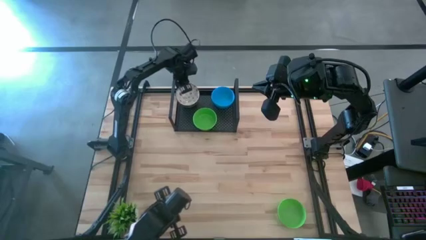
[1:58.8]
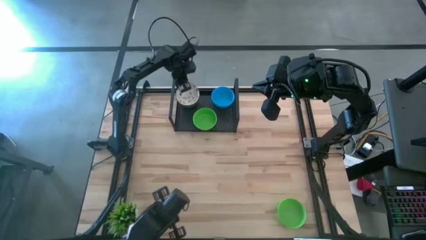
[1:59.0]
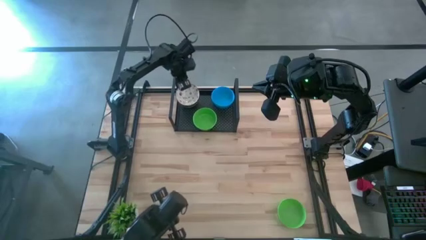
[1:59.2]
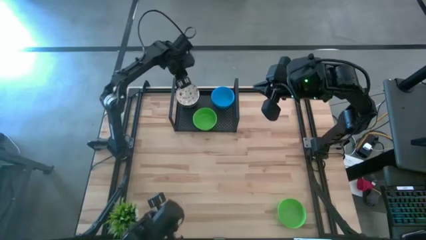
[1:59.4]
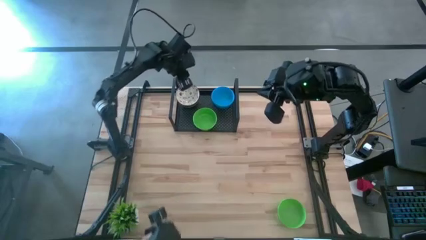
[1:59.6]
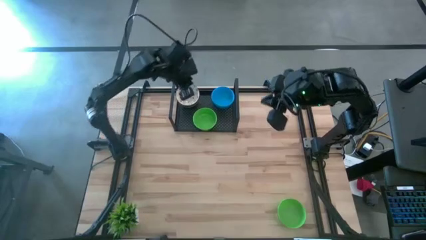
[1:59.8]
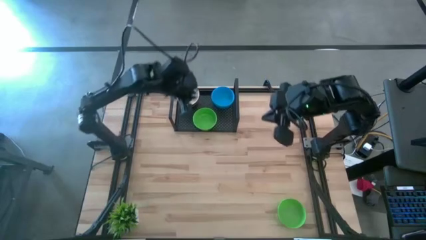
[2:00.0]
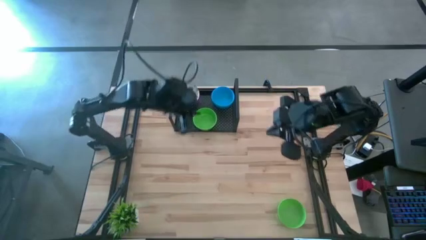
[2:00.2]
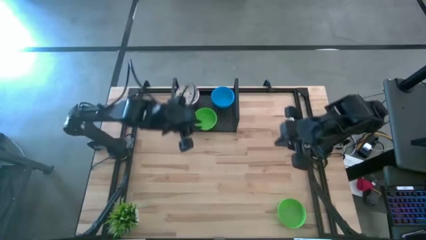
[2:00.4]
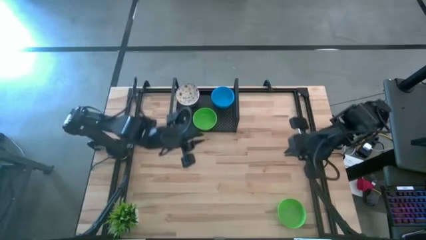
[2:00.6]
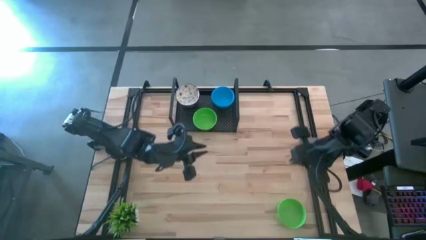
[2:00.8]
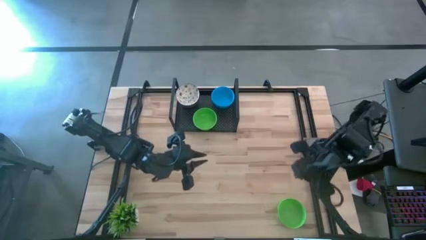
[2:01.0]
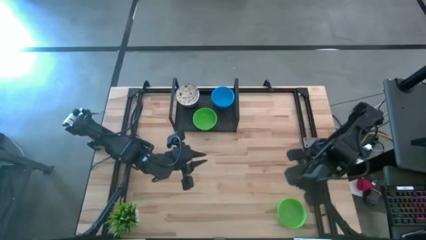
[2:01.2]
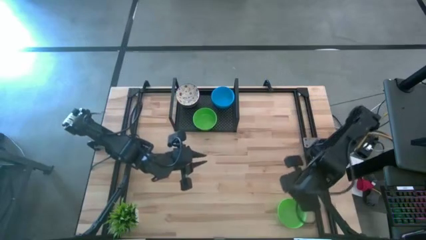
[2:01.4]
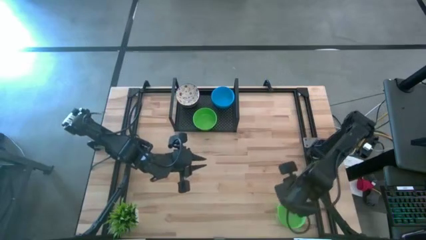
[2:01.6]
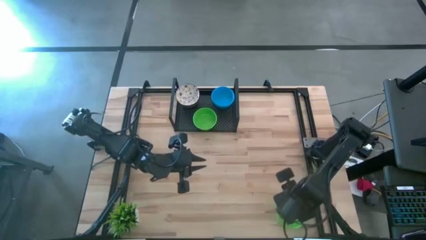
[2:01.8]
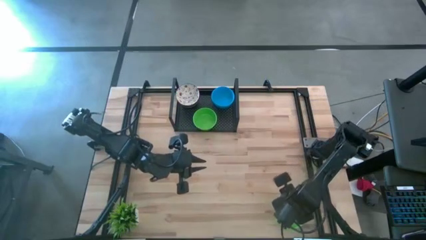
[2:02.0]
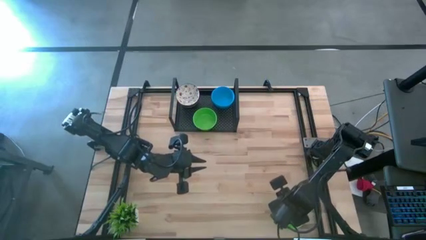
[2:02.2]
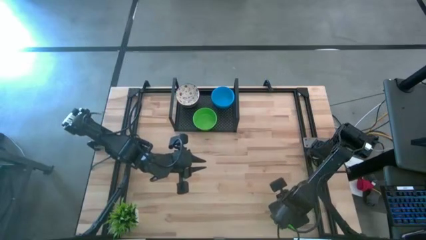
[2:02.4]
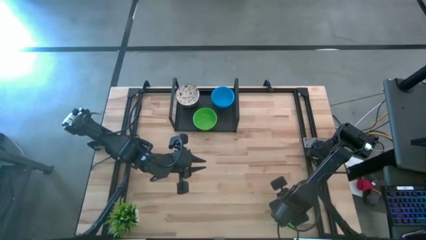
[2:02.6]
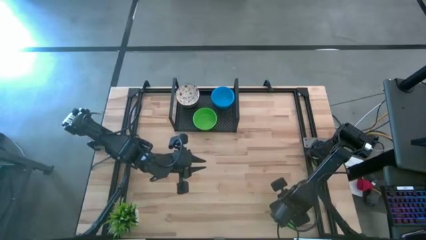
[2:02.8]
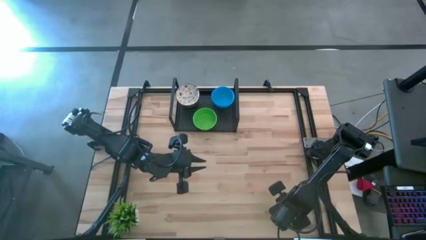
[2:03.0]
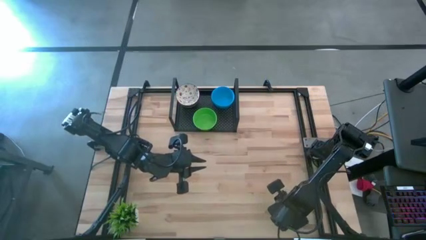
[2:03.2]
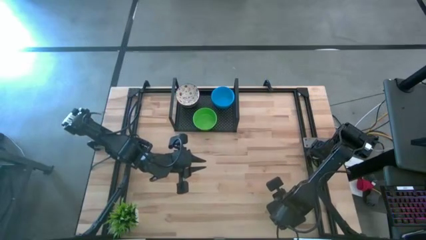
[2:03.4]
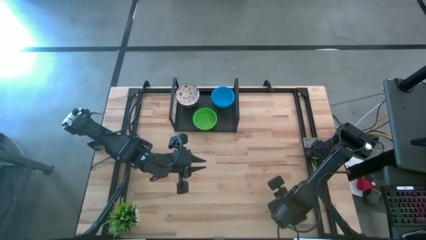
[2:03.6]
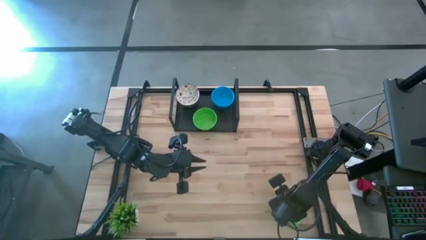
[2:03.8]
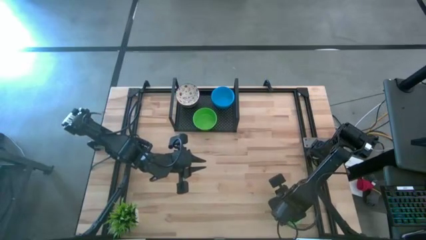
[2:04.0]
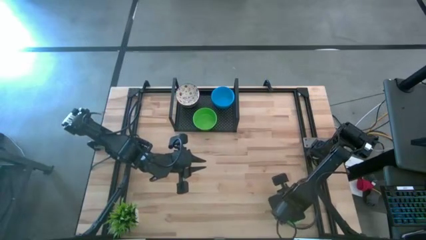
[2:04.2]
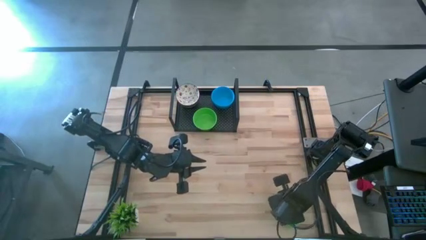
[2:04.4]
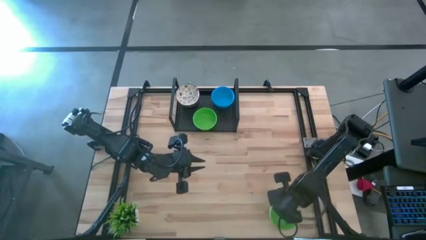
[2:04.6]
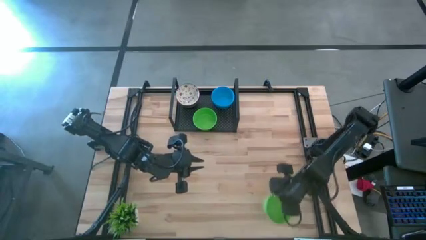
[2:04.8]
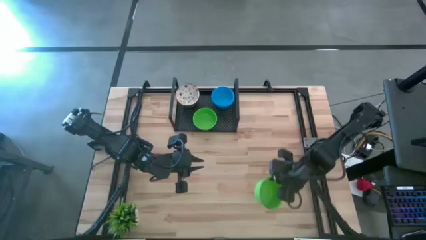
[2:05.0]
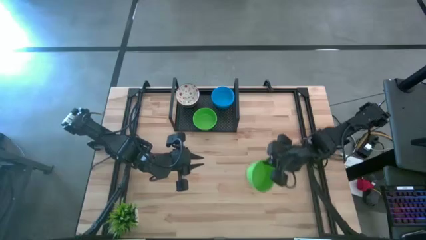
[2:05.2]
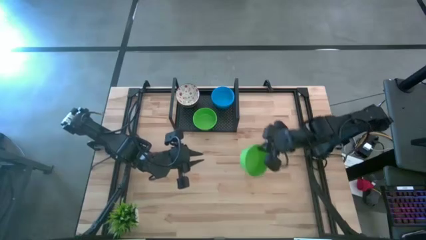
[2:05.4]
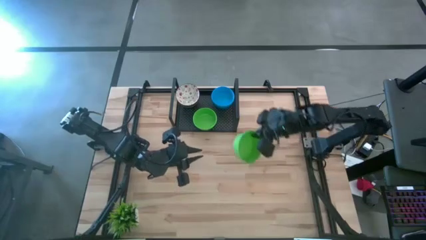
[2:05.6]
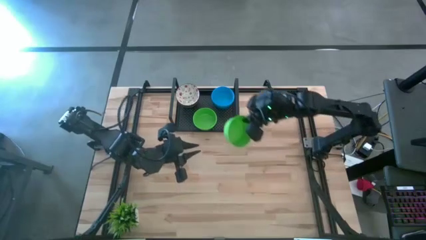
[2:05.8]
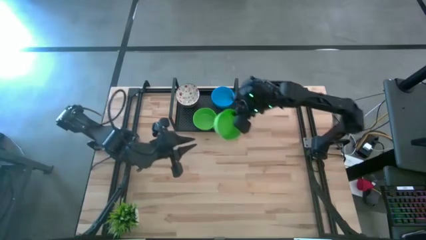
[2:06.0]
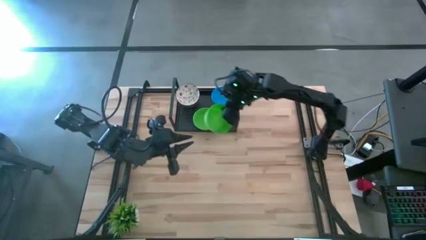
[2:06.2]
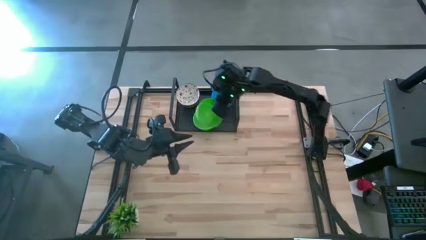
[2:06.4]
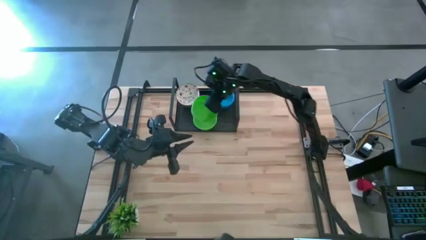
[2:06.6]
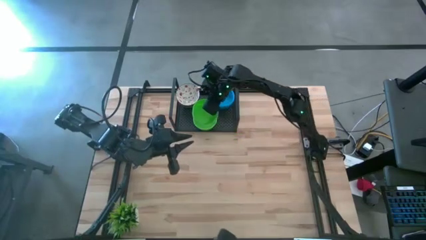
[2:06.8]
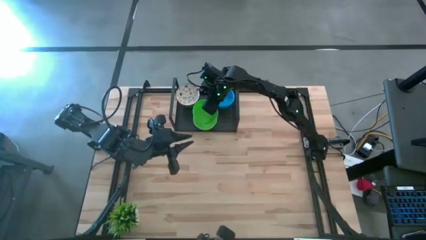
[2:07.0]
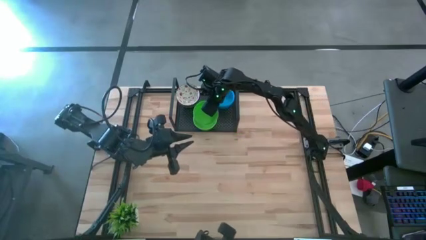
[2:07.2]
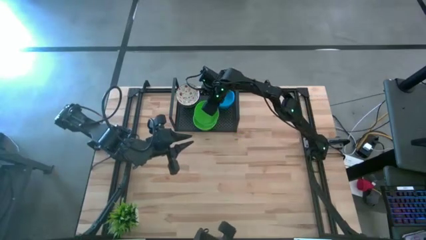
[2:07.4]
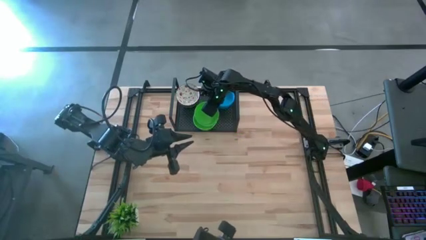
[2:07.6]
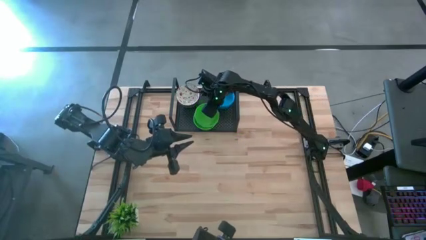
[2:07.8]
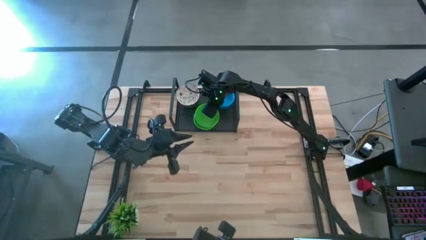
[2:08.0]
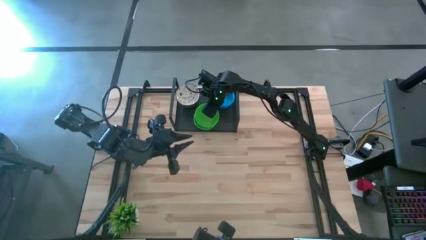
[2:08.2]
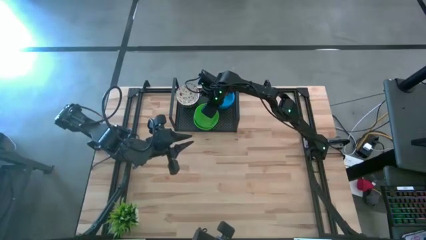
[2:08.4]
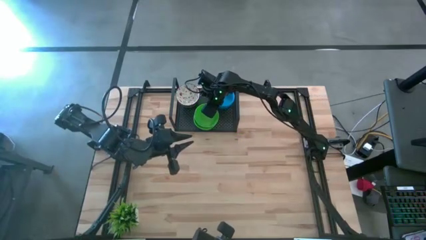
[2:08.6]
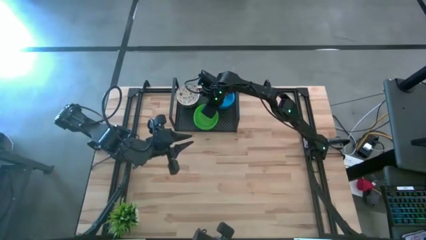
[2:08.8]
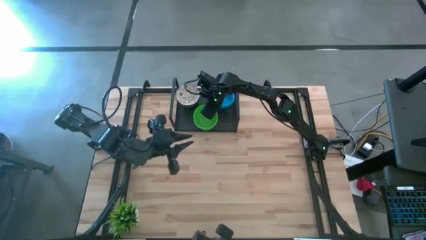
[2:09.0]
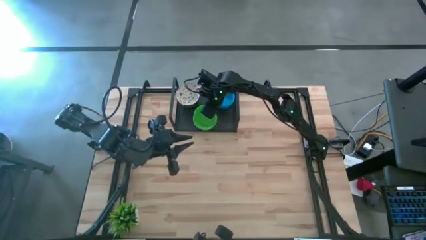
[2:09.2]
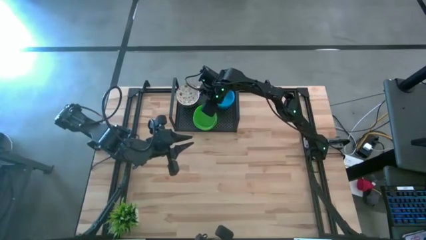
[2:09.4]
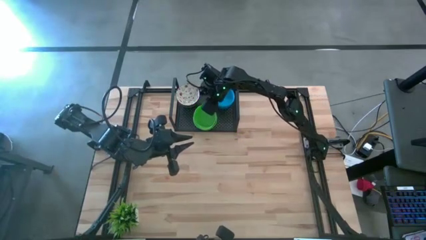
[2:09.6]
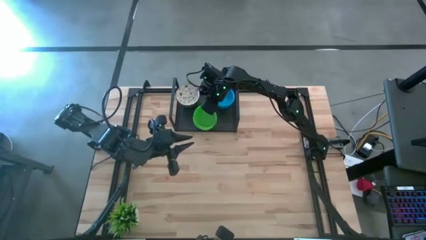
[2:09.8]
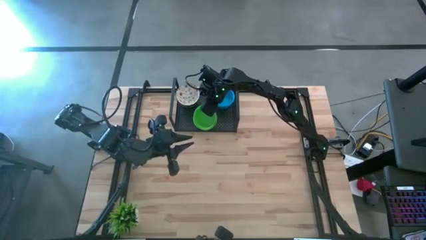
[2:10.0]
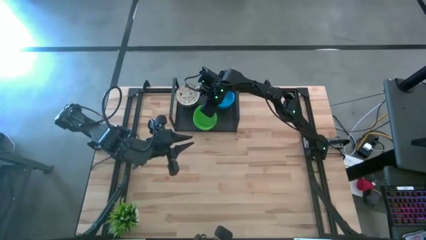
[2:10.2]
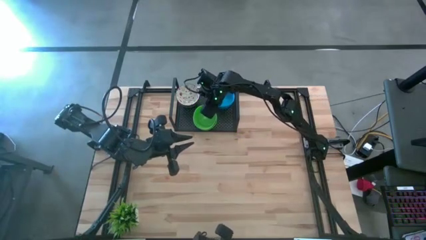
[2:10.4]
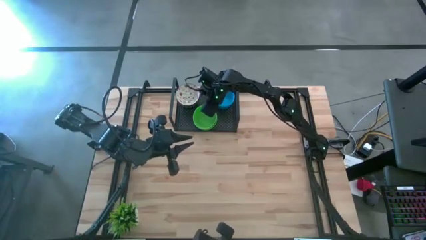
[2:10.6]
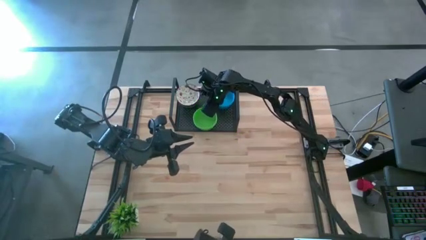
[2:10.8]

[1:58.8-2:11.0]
Task: Pick & Place Mini bowls
Stack the green bowl on top of the green bowls on the shelf

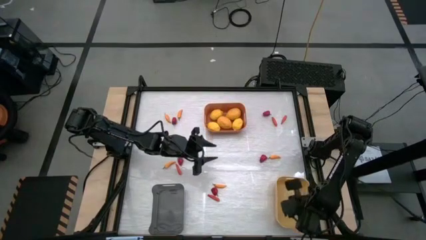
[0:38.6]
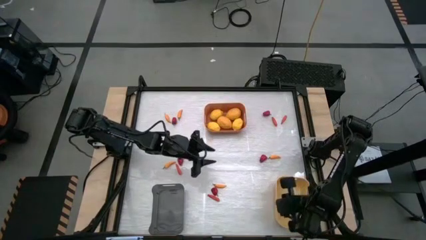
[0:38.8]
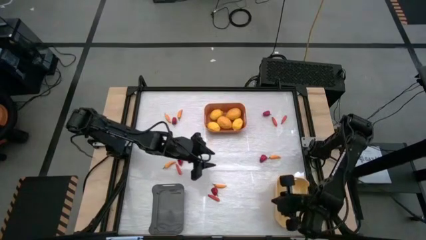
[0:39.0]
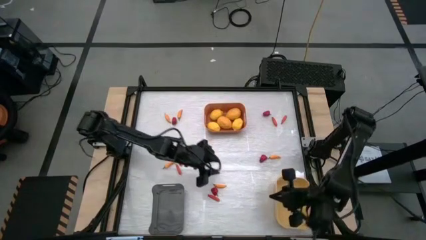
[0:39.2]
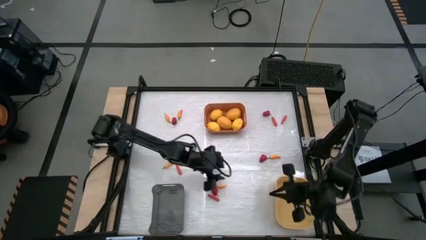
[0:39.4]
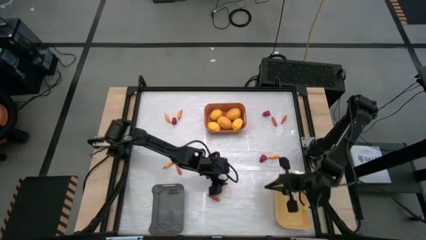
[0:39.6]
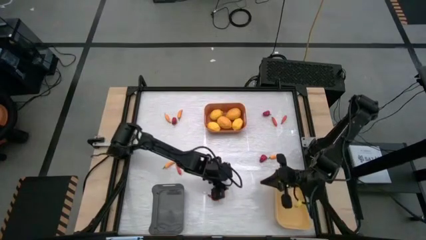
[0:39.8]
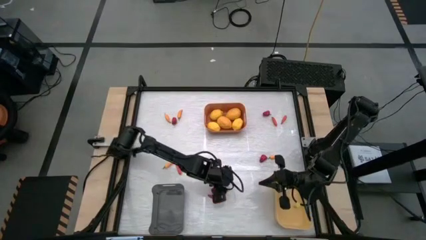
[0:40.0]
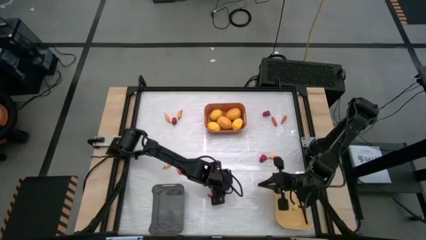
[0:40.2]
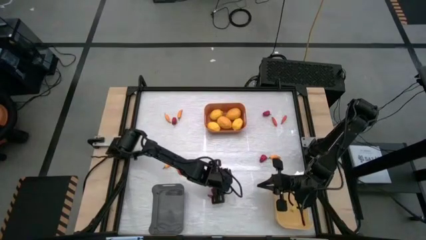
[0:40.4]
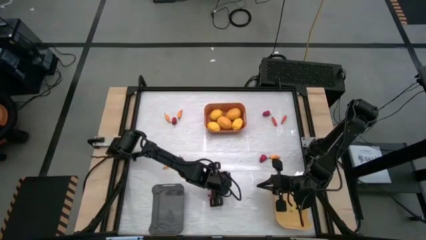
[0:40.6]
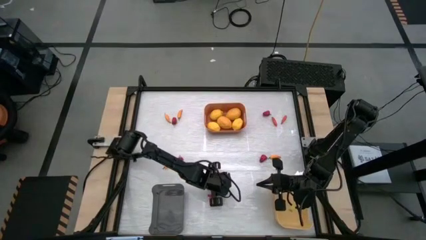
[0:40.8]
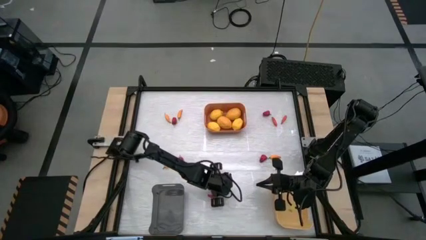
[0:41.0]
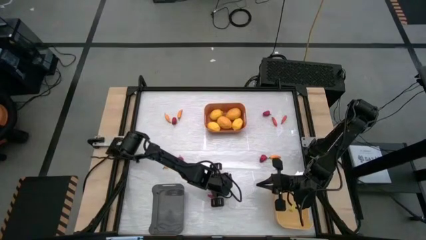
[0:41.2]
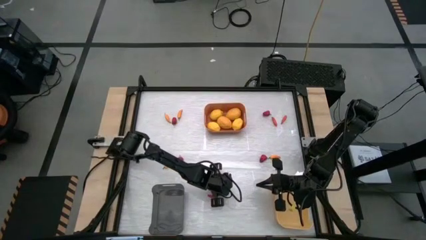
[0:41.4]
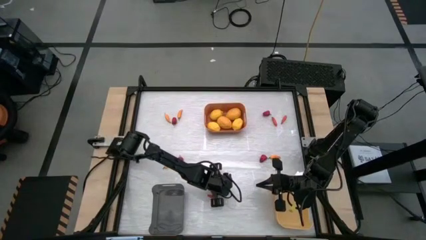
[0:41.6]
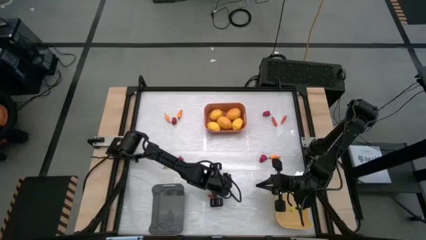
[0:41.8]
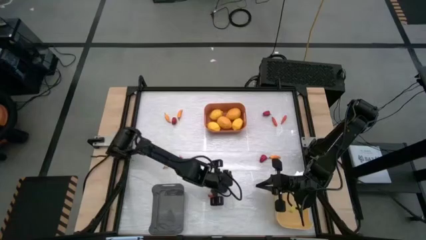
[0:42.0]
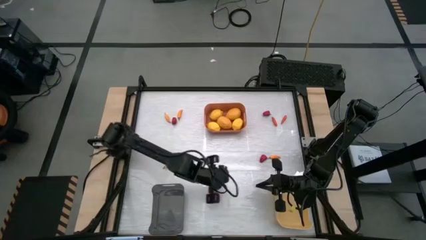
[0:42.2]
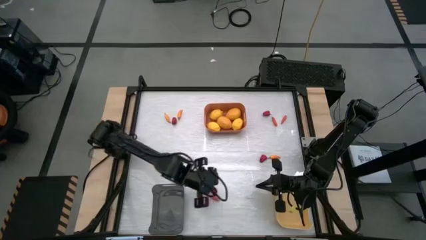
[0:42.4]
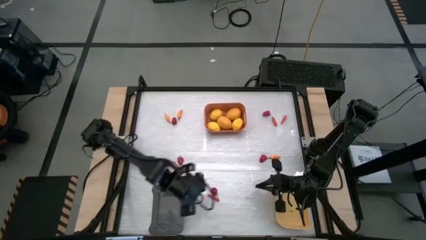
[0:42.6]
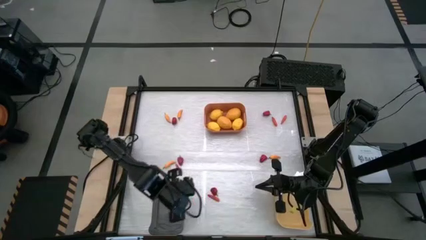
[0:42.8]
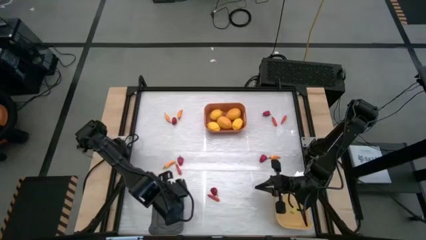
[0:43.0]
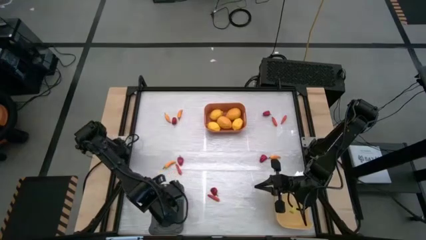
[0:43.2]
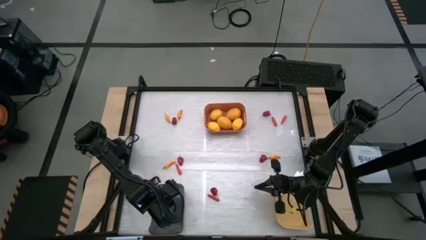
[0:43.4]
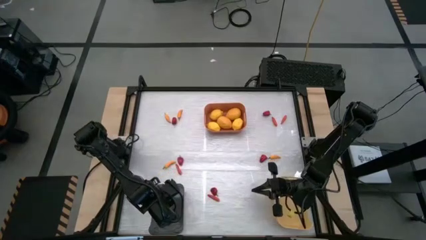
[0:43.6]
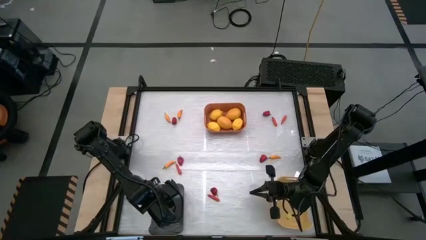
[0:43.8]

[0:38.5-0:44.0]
Task: Sort produce into baskets
Put the yellow chili pepper into the black bin
